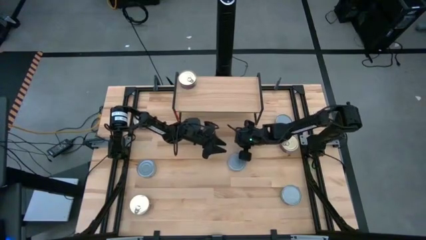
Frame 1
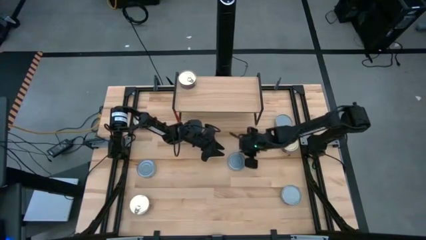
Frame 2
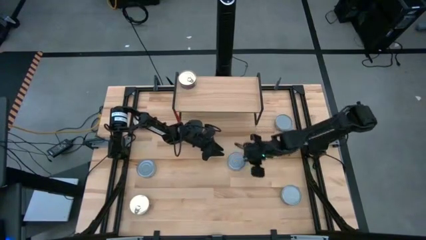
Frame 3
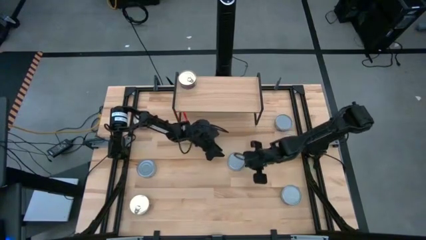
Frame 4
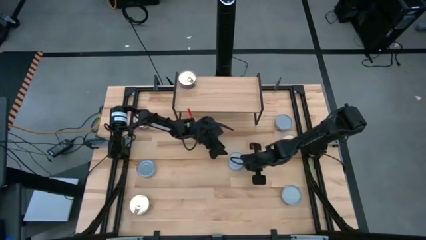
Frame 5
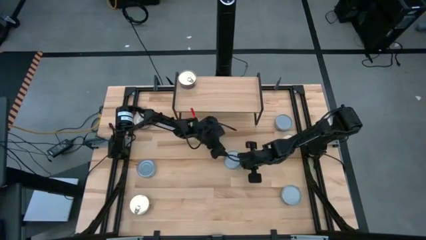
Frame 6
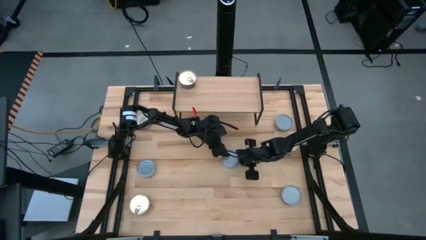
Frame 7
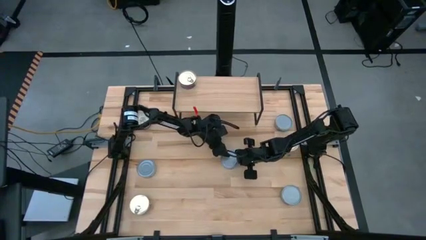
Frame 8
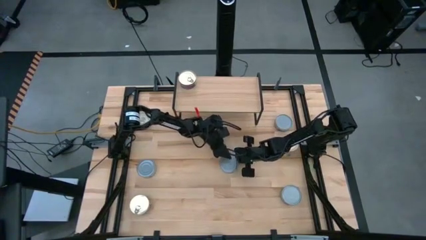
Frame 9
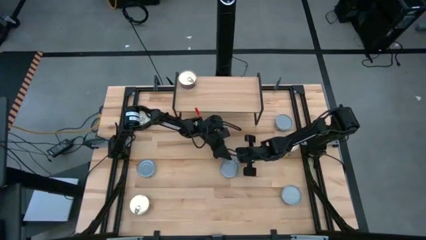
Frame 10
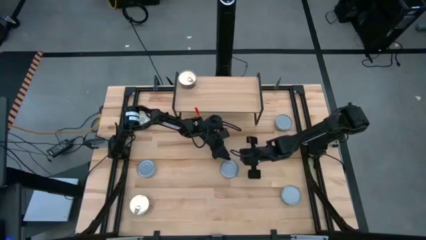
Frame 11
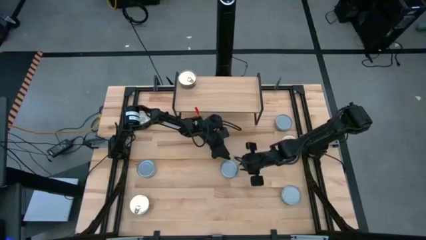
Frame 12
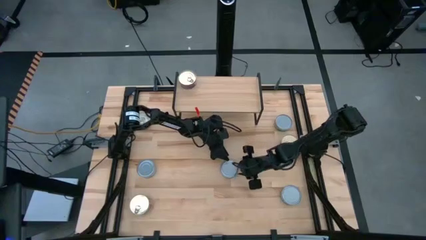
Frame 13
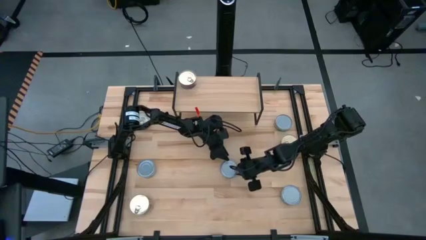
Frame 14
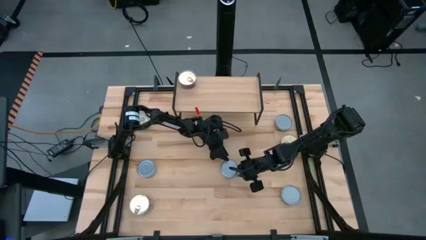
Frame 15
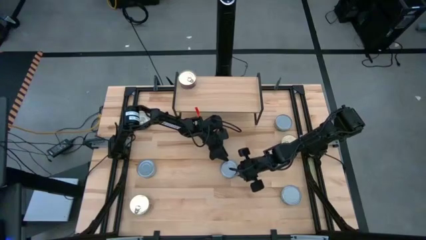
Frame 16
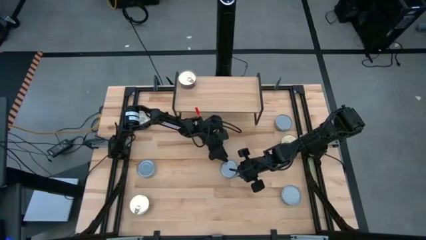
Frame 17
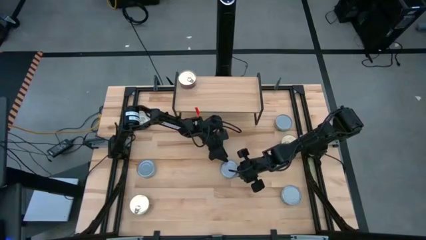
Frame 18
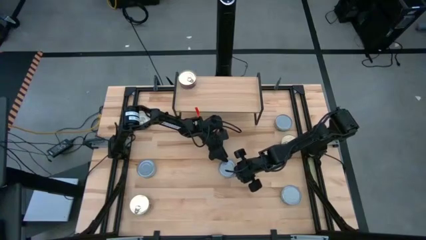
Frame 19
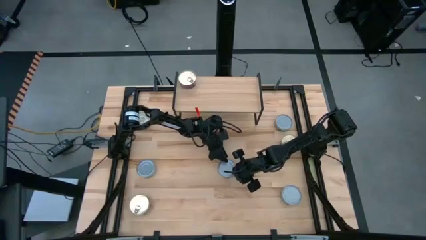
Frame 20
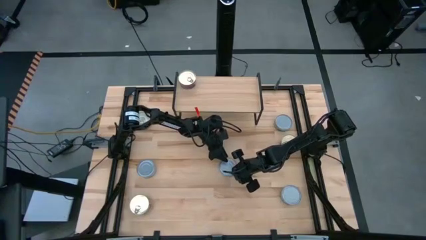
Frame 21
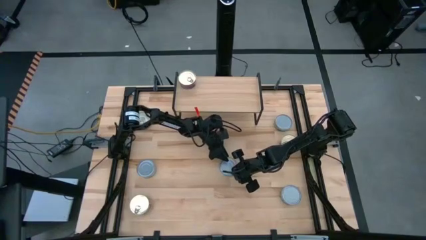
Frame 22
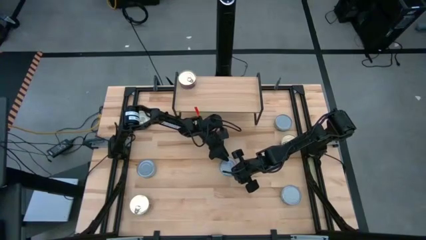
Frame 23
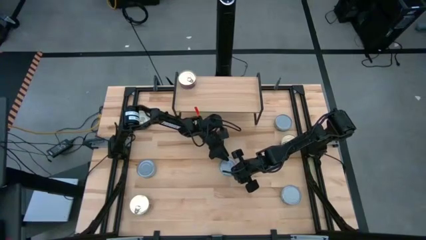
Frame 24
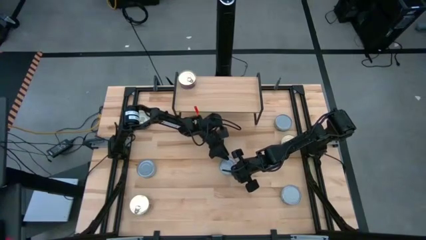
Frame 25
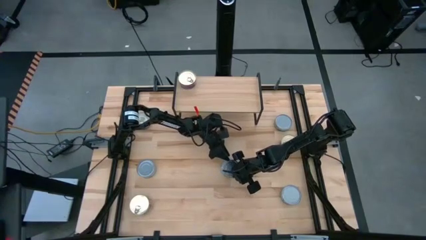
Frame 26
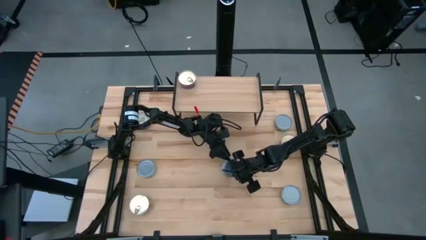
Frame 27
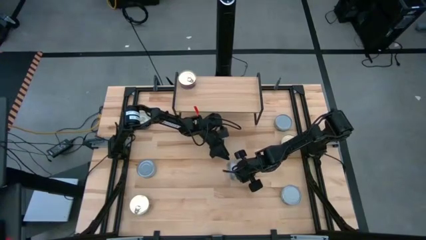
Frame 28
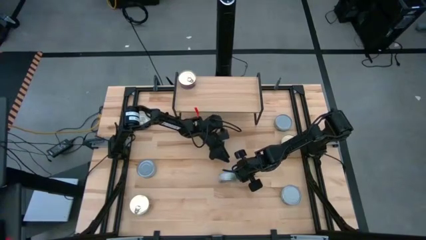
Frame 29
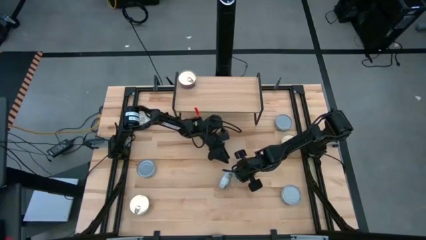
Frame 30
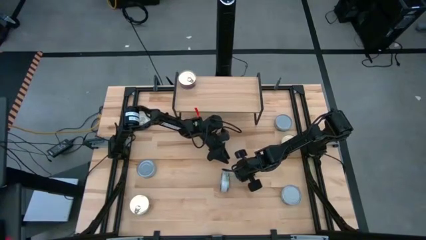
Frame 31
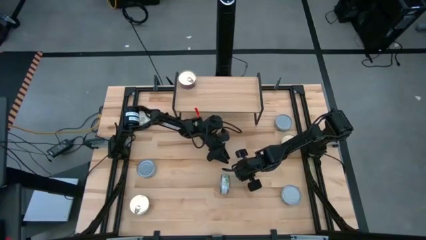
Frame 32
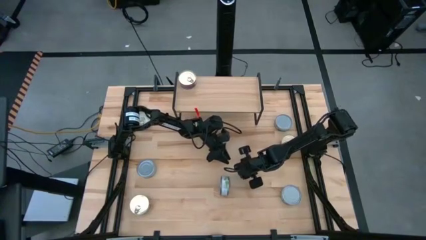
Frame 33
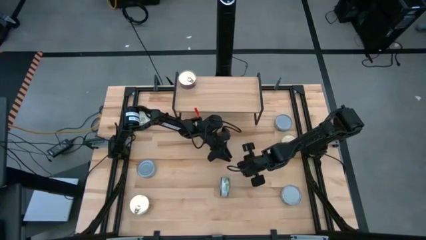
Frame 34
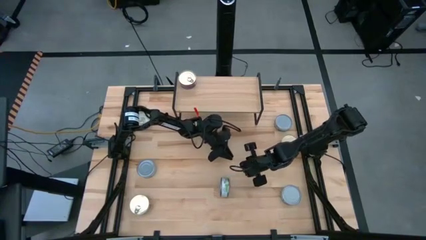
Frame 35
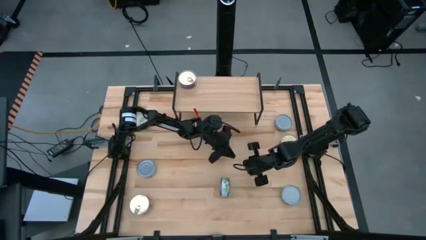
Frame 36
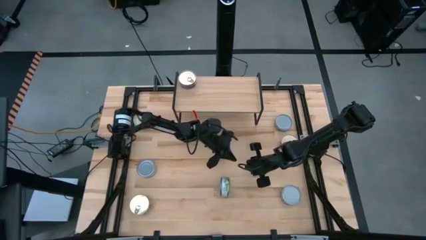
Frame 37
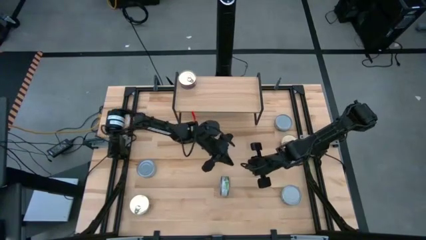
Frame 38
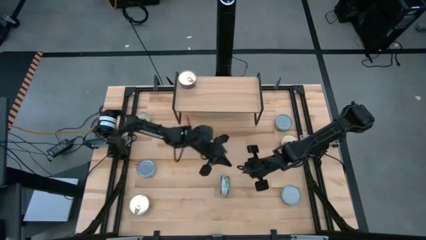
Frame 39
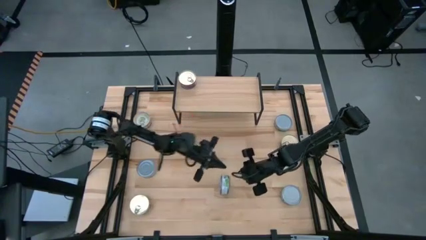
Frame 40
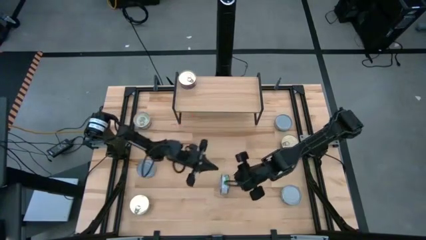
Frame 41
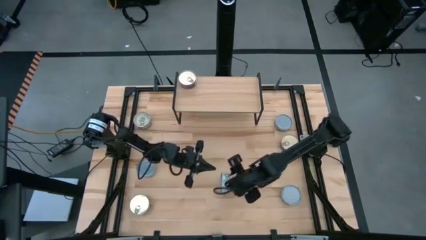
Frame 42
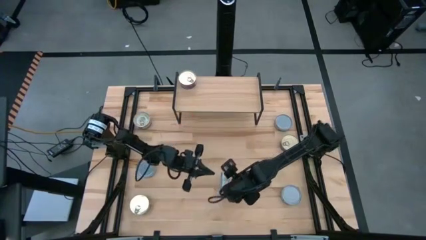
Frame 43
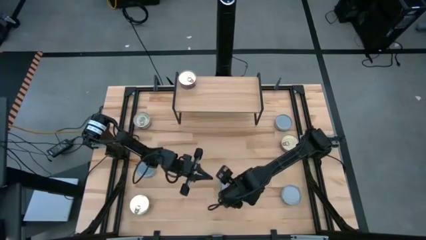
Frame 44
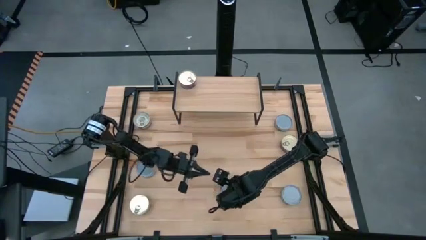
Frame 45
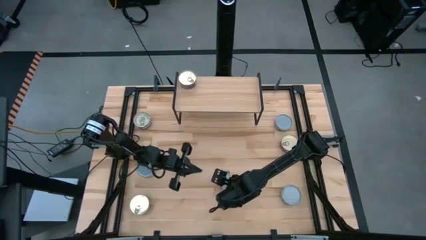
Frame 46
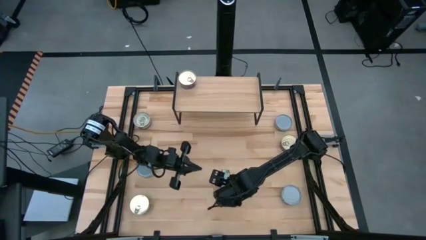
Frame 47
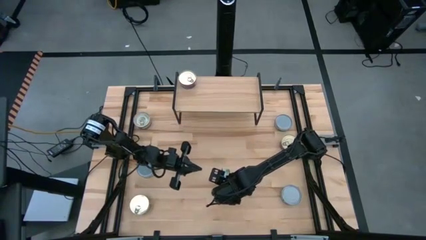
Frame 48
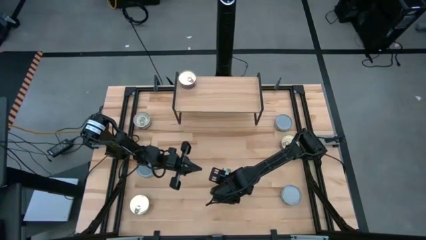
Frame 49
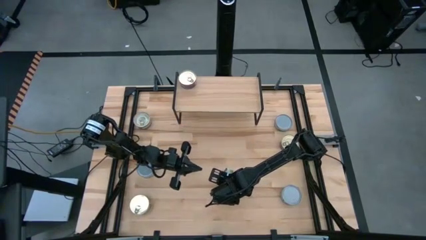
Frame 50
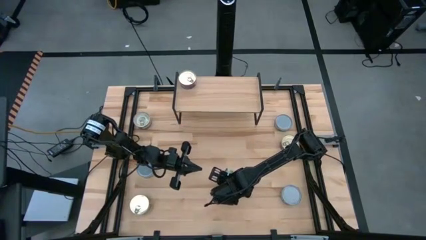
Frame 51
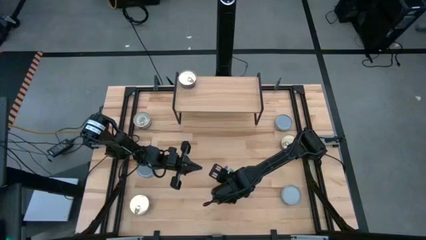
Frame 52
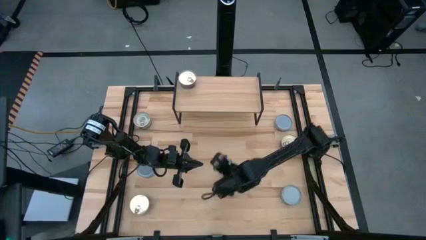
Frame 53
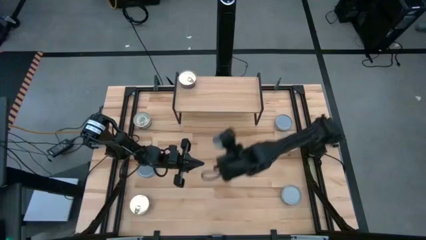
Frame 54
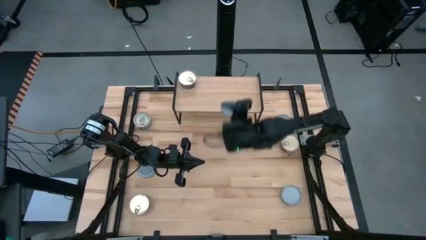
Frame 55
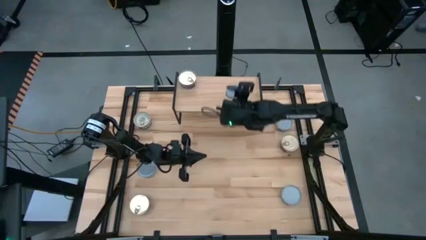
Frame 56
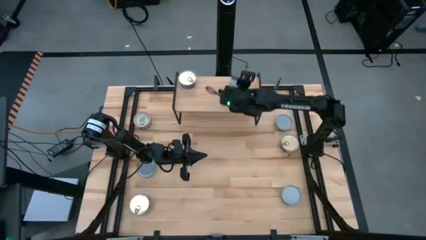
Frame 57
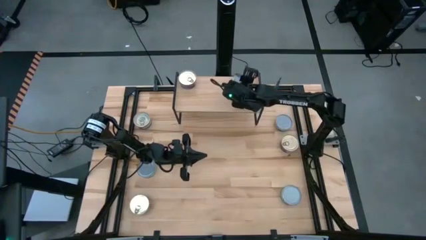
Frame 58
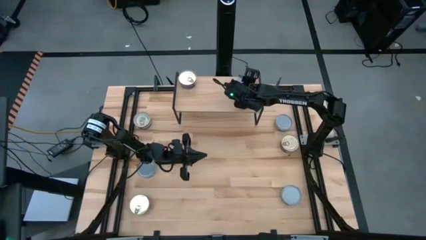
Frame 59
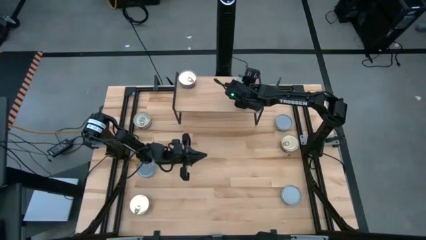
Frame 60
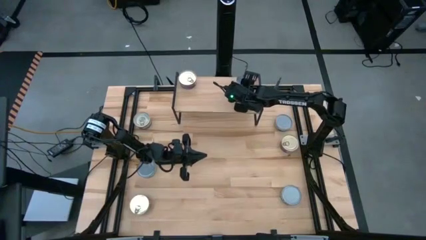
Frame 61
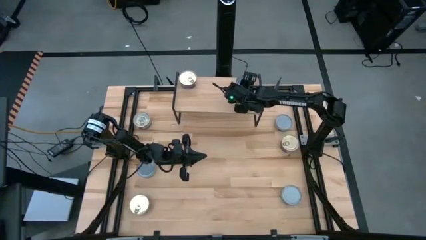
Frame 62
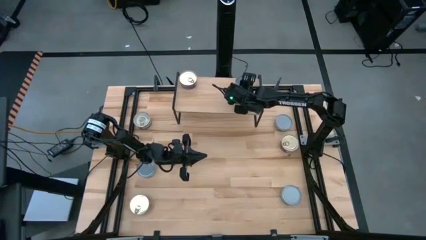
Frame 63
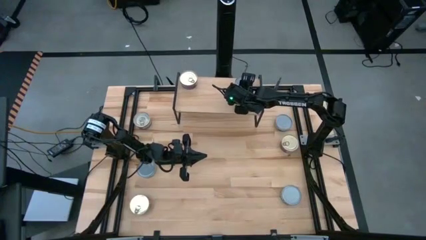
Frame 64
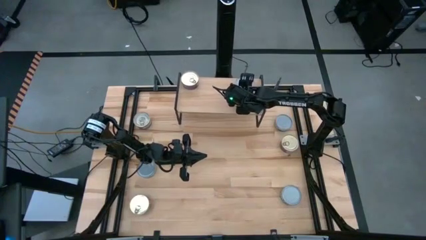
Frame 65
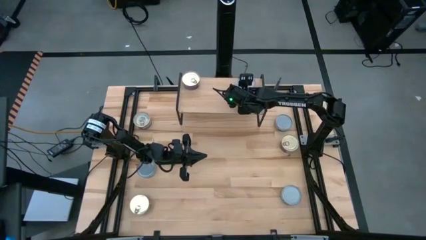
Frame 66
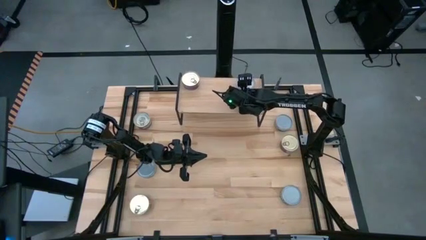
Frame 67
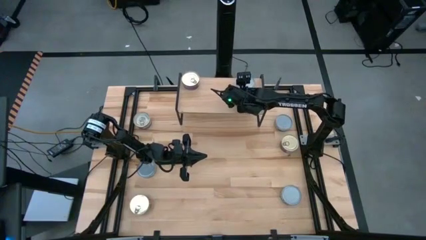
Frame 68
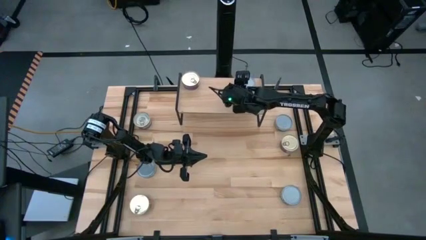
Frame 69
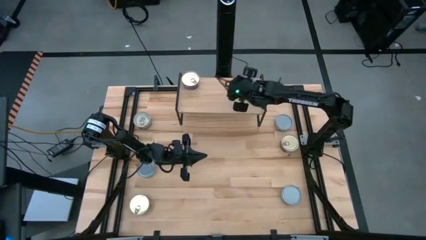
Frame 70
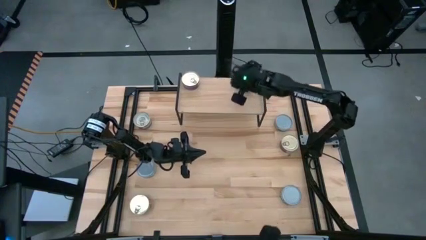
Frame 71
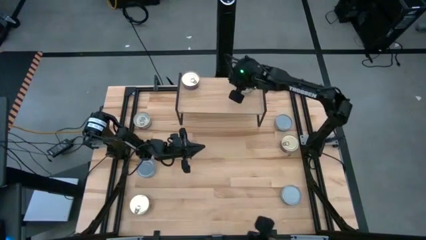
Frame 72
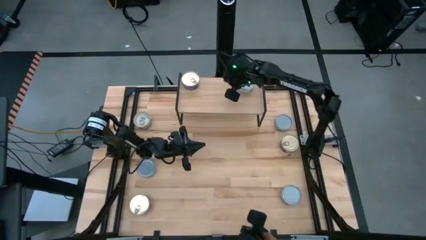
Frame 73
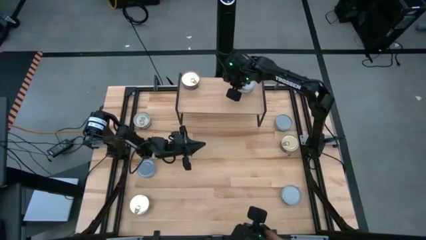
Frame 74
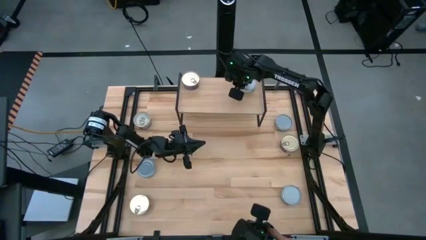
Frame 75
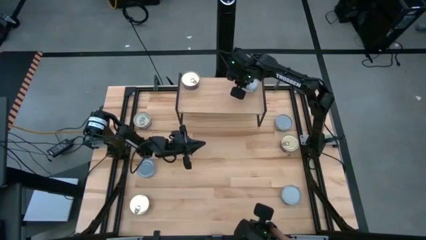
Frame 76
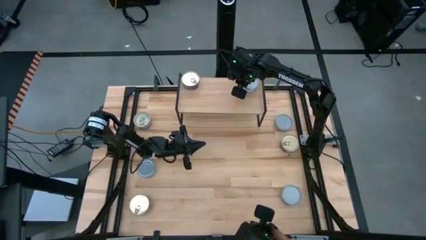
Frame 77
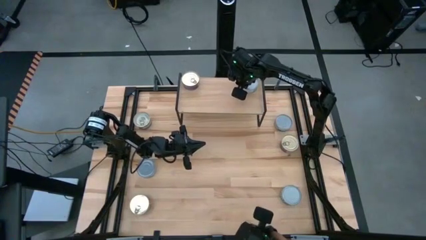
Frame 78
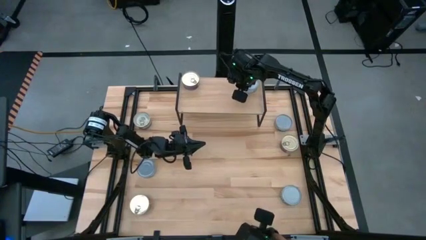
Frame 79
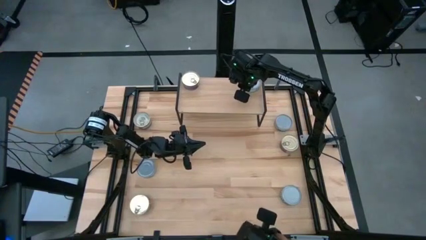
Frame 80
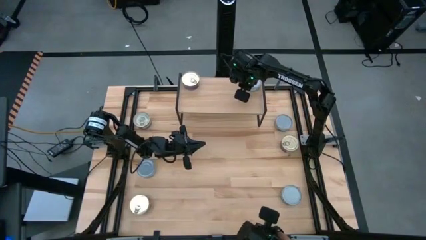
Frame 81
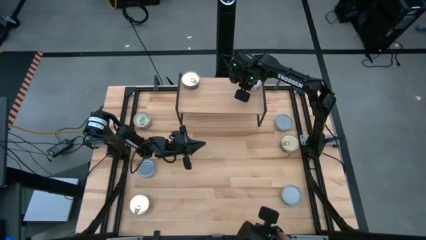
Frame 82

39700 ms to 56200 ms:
Task: Stack canned seafood by type on shelf
Put the center green tuna can on the shelf
